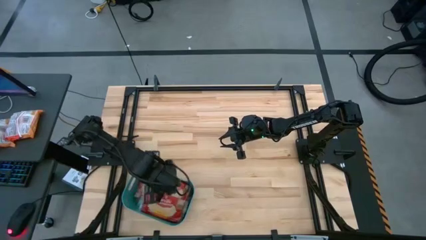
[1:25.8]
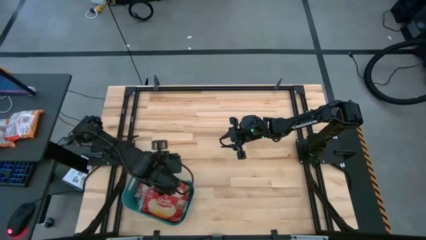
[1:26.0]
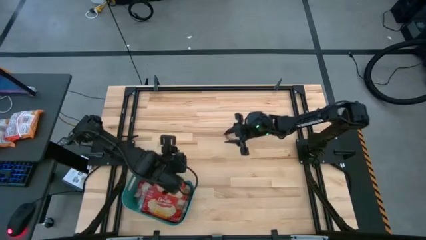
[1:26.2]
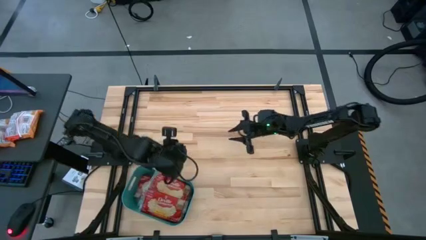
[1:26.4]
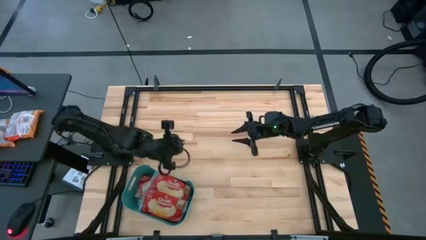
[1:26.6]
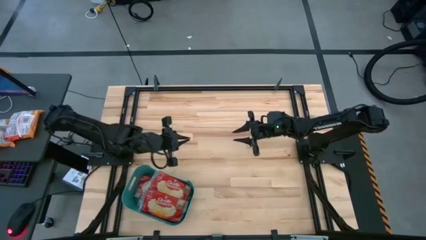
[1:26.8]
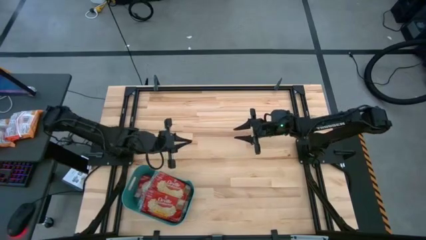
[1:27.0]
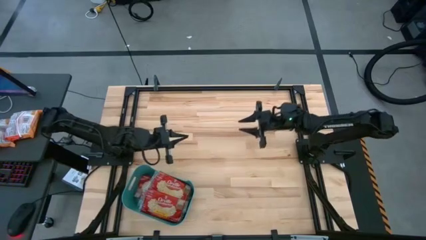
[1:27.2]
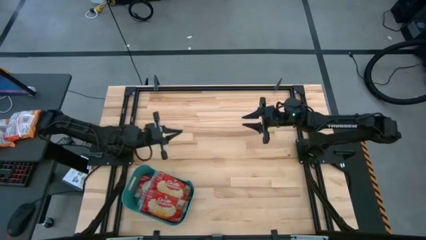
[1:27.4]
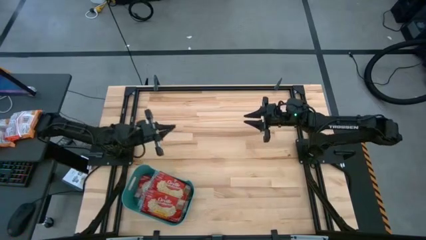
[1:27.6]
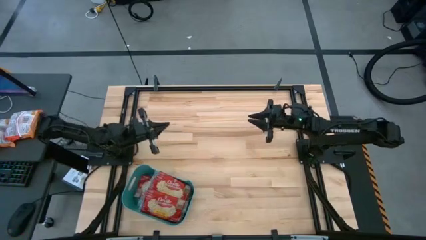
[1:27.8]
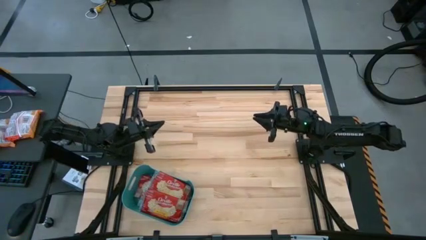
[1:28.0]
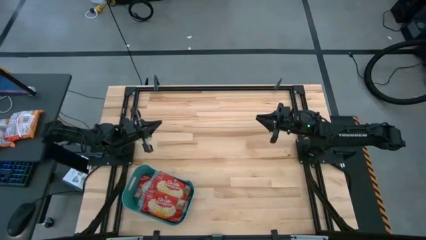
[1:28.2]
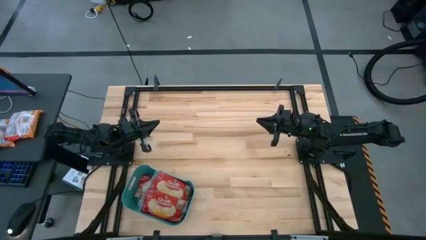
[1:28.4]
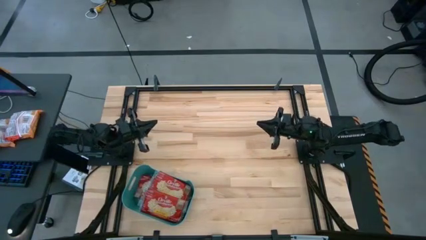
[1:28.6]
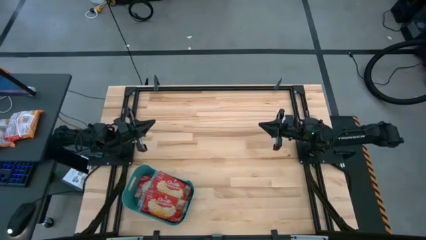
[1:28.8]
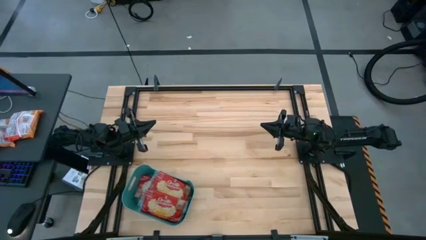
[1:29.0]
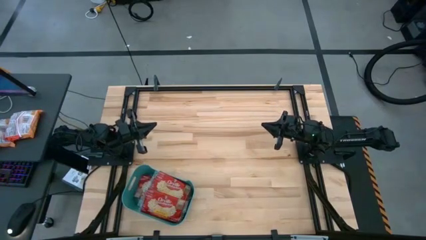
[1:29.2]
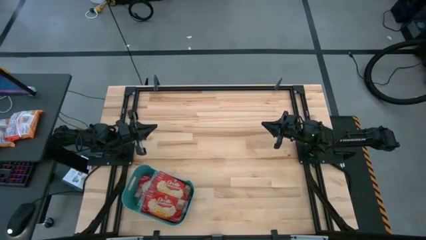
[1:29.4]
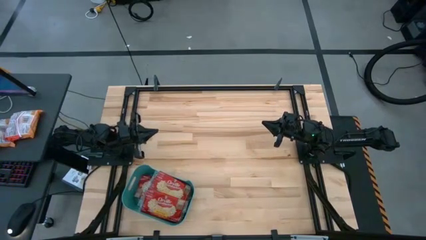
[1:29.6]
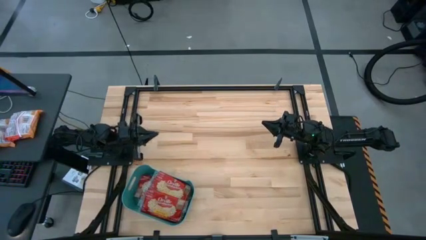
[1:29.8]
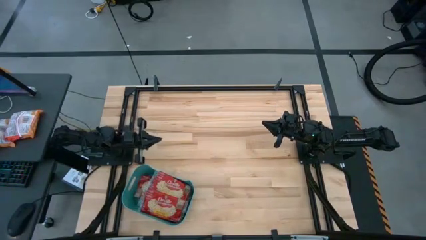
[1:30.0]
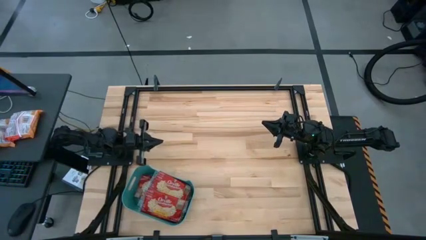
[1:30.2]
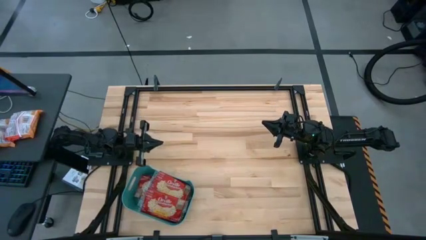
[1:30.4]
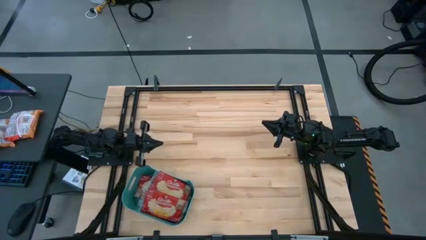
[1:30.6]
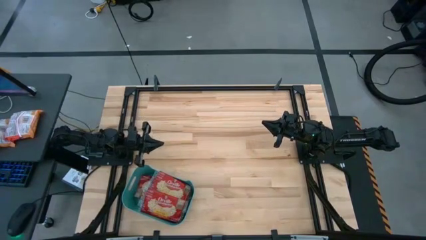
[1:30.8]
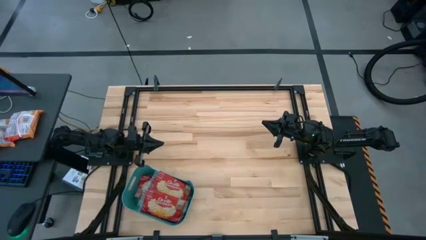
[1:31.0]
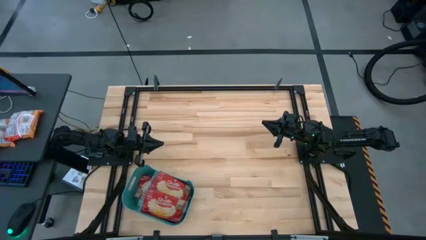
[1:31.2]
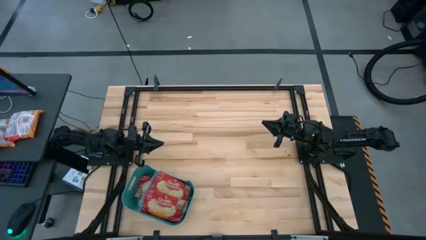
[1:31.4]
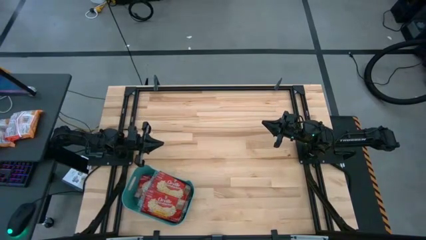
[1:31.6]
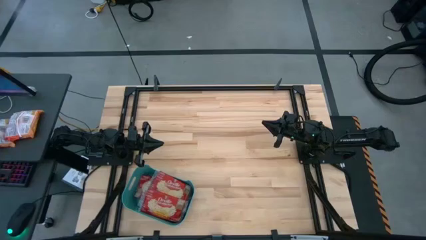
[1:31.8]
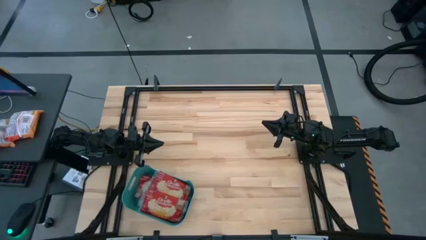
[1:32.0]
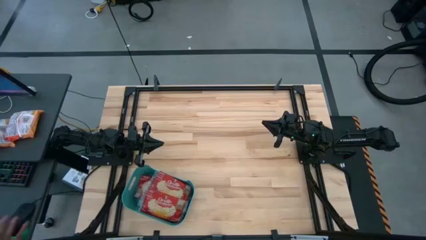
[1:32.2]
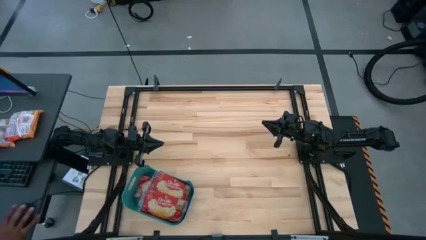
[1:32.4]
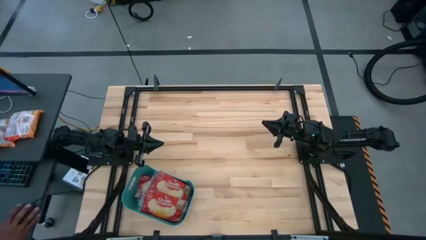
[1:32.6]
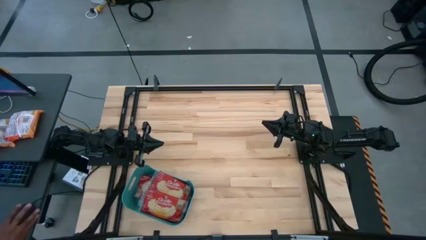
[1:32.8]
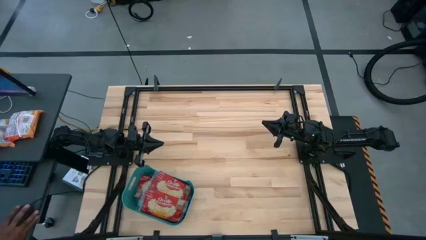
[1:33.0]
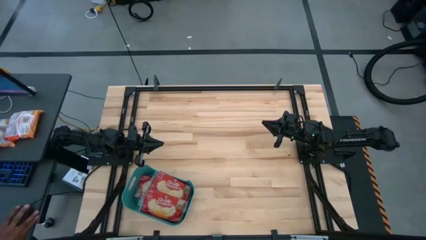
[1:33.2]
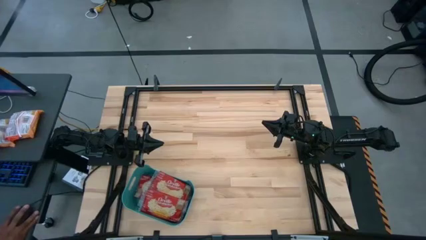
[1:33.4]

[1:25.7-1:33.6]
Task: Sort popcorn bags into baskets
Return to Home Position

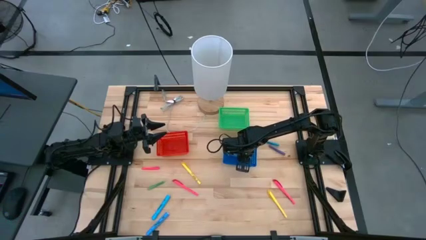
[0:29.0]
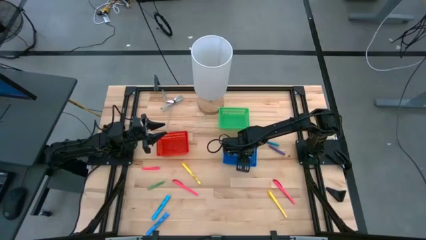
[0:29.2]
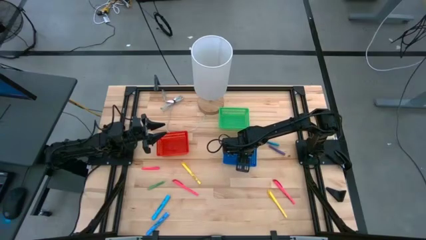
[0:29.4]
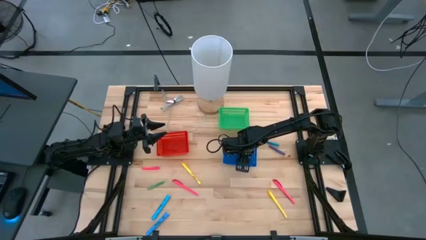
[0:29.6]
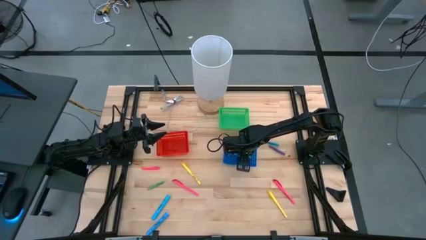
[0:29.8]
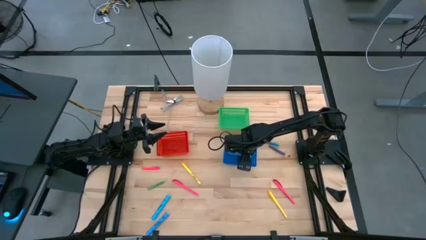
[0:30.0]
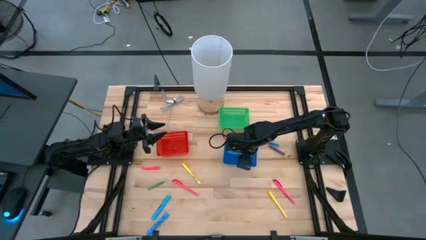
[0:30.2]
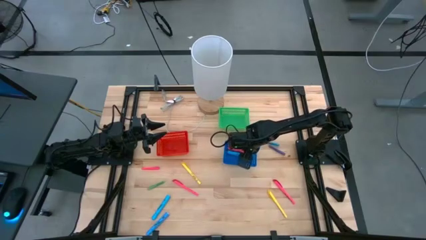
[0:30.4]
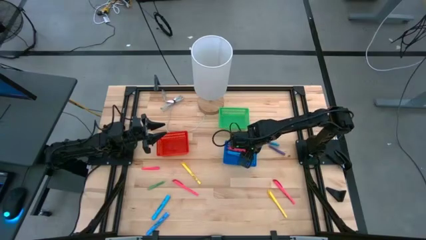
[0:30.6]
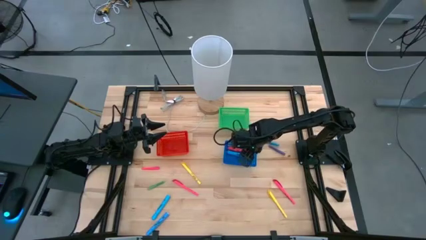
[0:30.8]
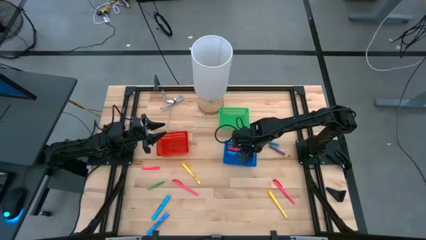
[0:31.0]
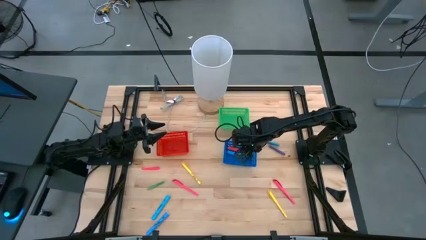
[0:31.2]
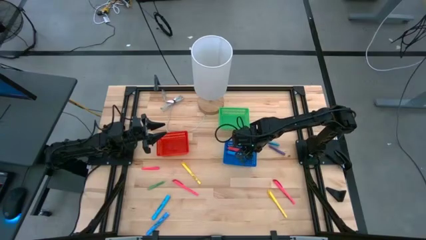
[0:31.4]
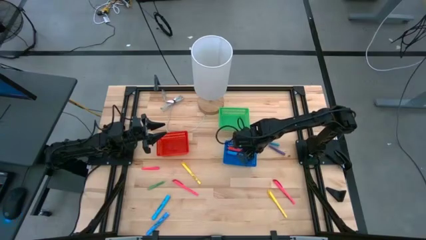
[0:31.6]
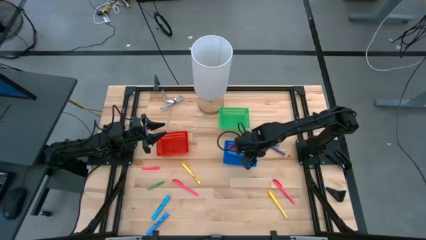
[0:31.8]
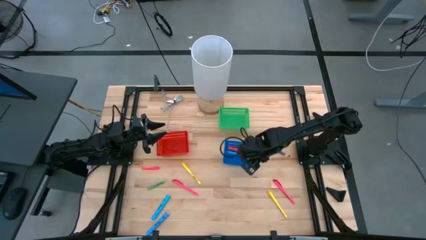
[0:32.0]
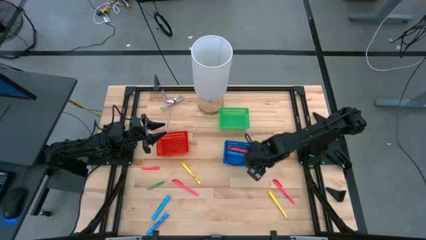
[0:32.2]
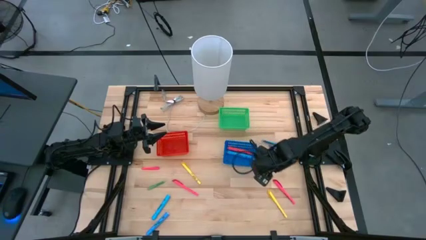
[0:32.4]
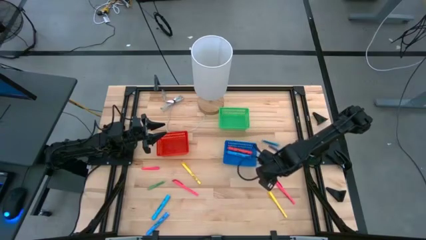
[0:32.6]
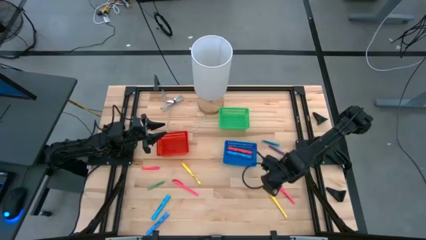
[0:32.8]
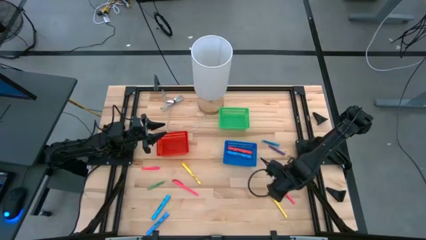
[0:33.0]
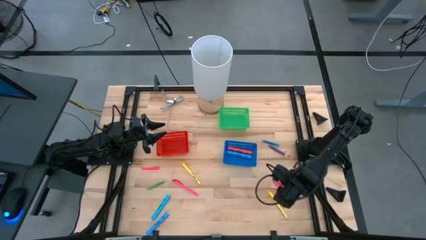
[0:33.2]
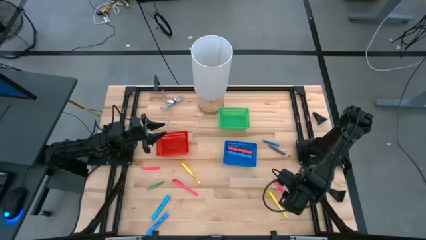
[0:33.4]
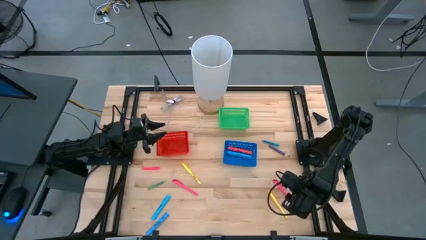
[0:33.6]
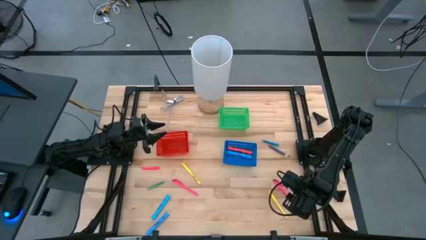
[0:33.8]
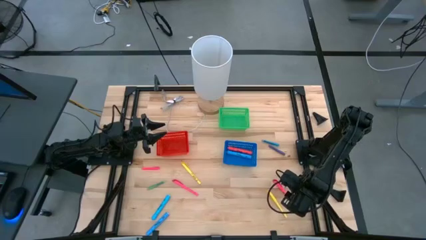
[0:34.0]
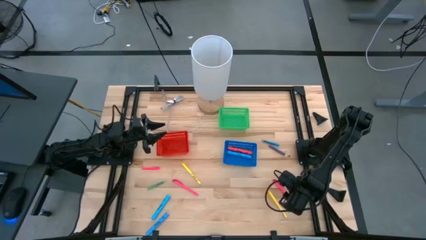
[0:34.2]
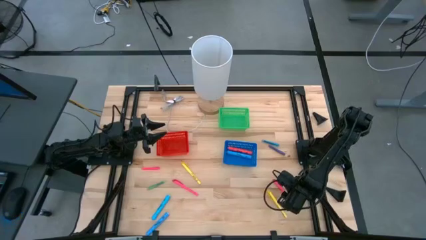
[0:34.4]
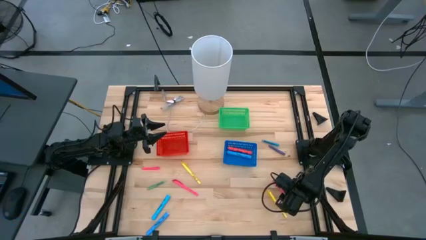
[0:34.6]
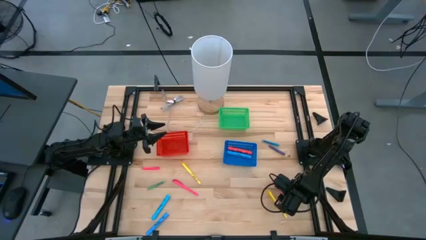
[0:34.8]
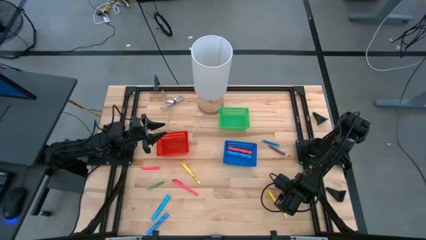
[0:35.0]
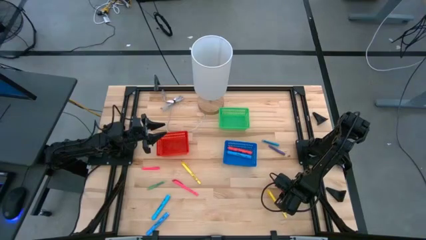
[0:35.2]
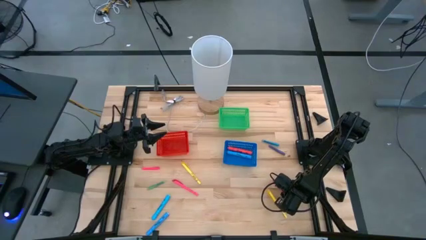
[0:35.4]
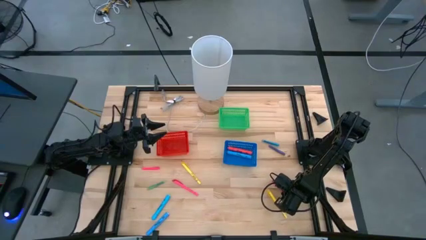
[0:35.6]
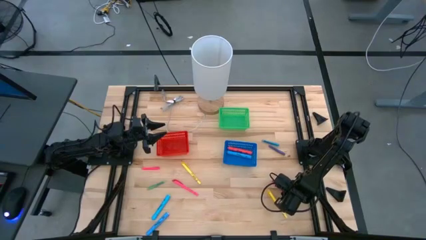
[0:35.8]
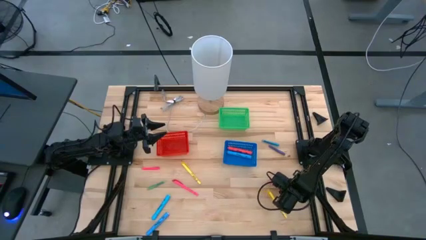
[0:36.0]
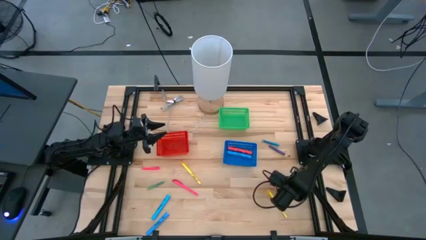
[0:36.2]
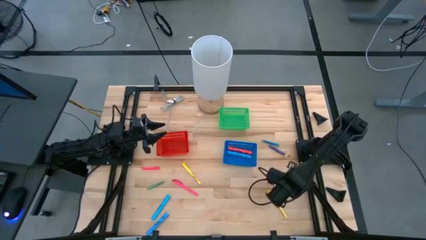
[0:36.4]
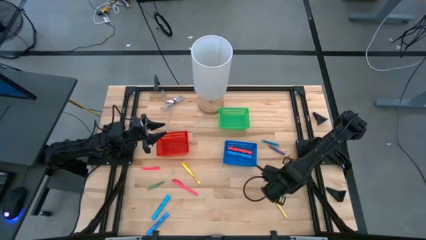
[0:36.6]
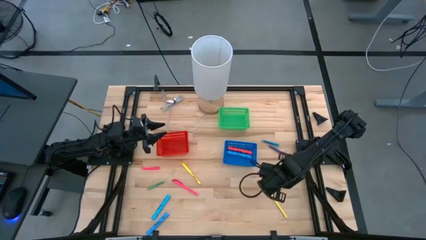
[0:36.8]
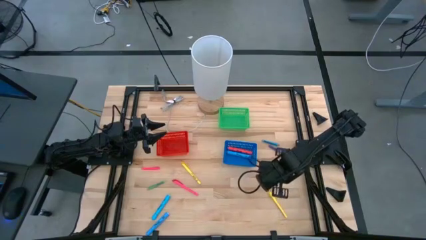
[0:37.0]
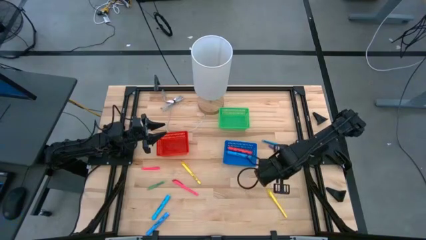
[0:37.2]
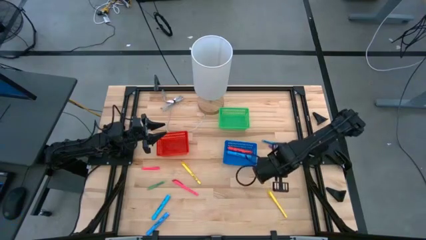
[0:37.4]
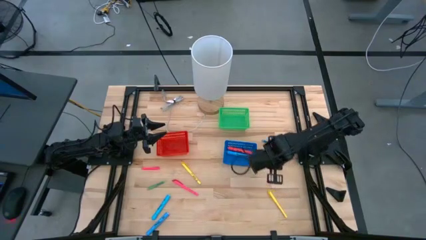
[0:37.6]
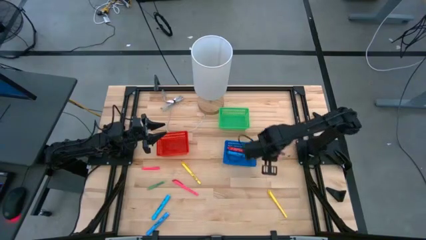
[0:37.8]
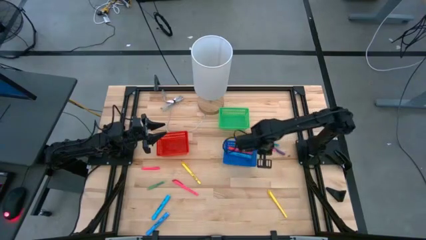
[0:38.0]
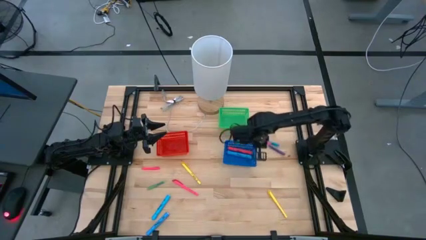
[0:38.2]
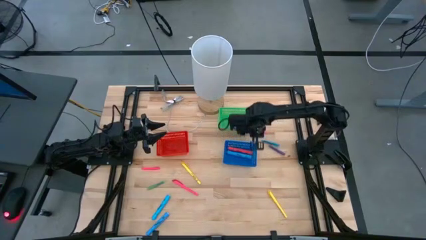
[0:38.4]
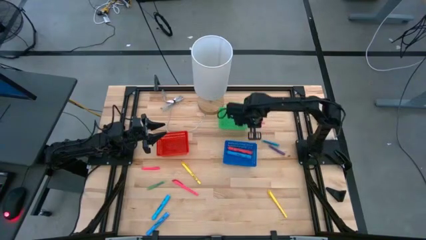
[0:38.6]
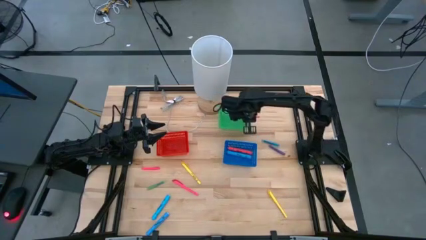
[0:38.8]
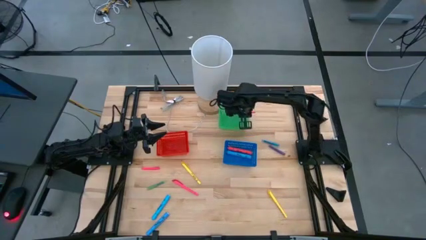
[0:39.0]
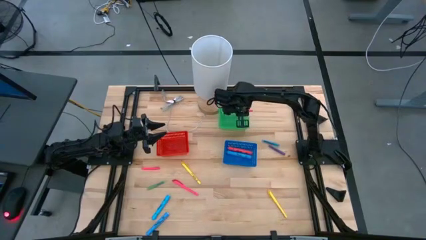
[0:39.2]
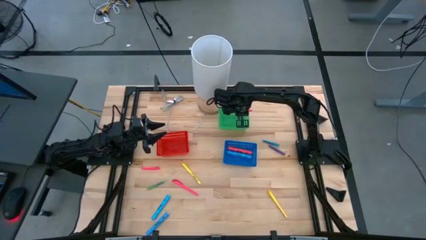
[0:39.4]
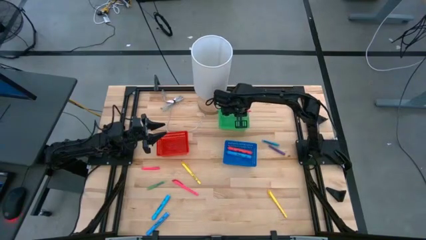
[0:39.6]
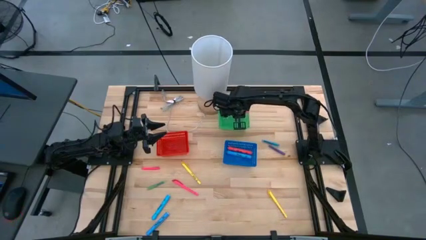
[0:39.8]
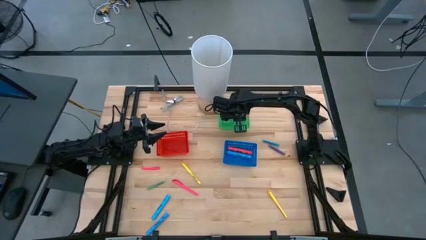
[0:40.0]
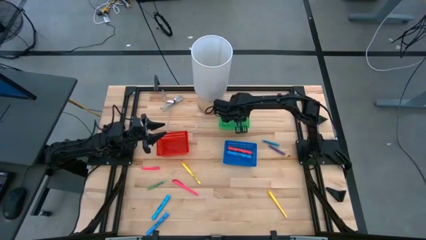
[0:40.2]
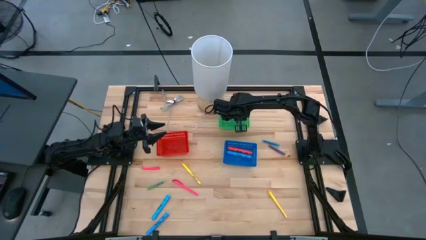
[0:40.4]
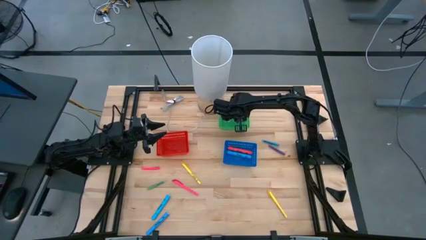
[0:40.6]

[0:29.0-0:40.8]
Task: Pick & Place Markers
Put the right large pink pen into the green bin
